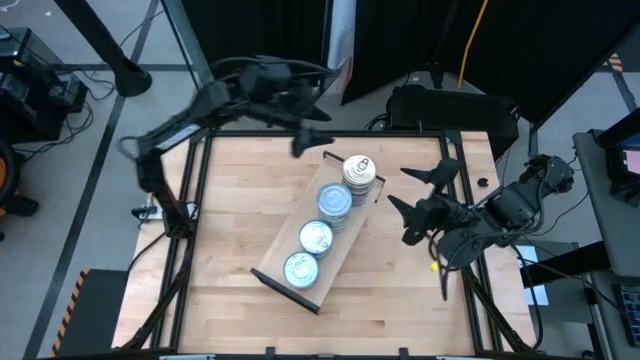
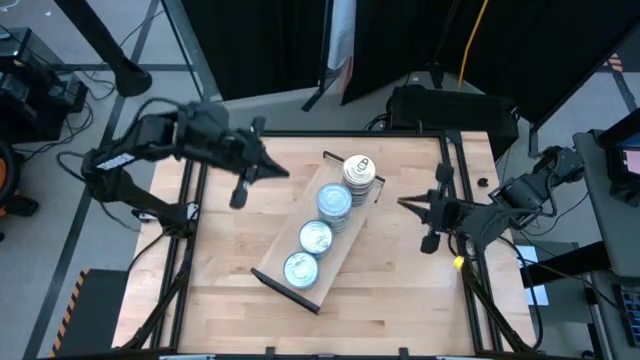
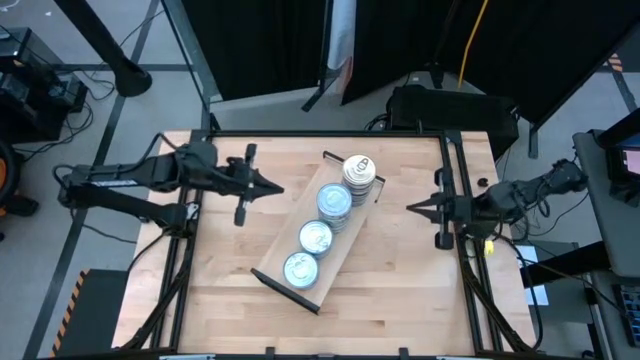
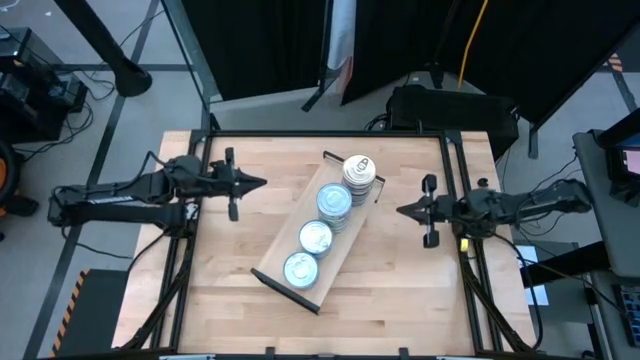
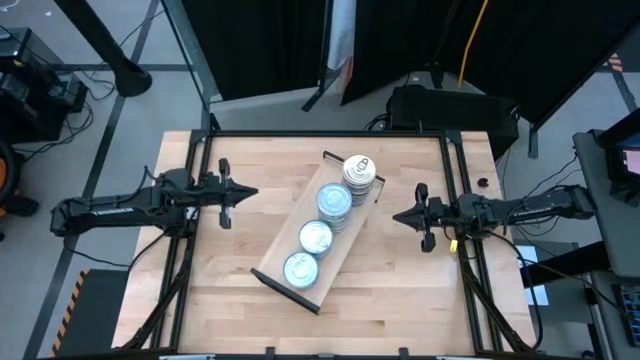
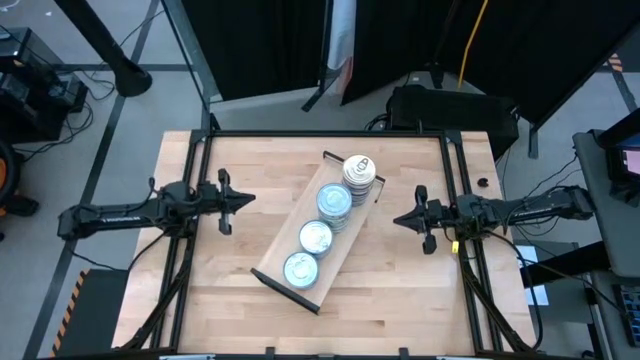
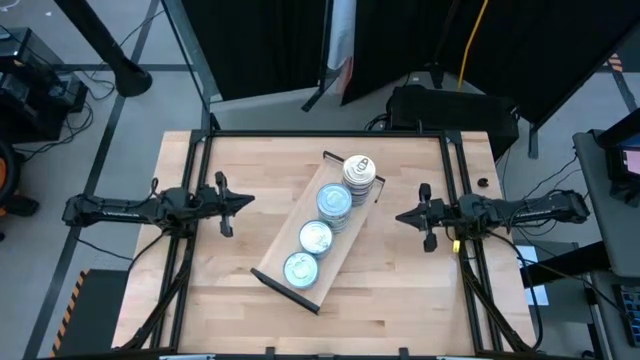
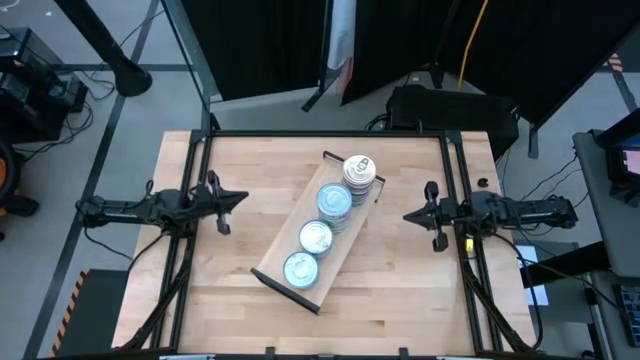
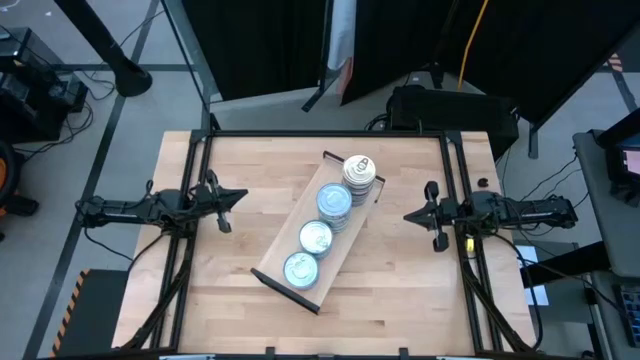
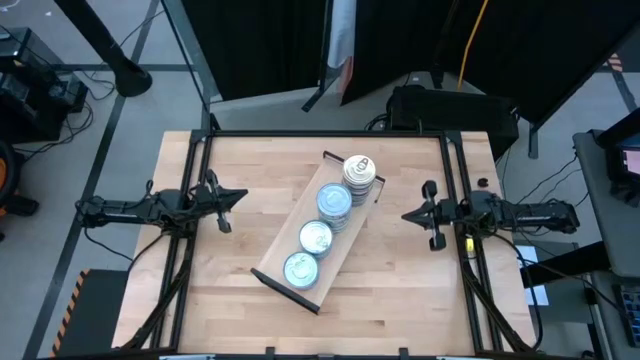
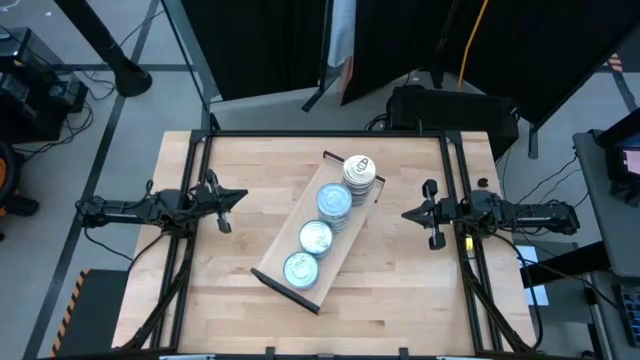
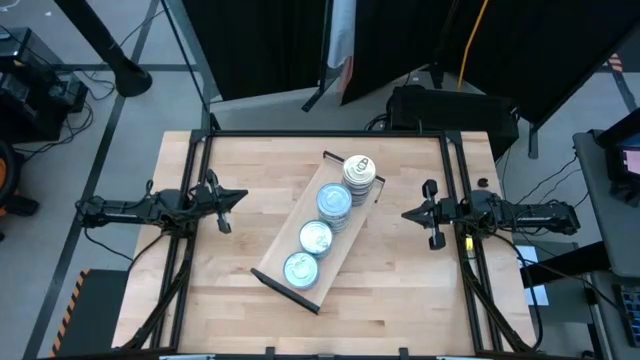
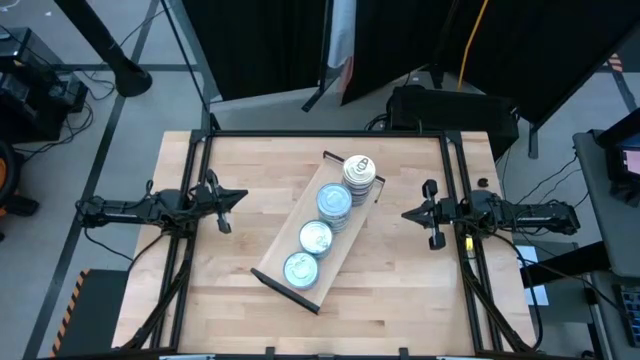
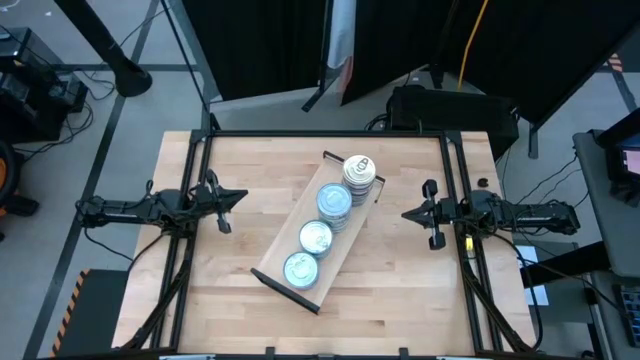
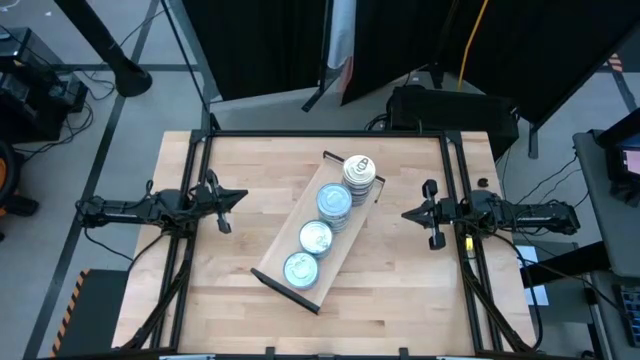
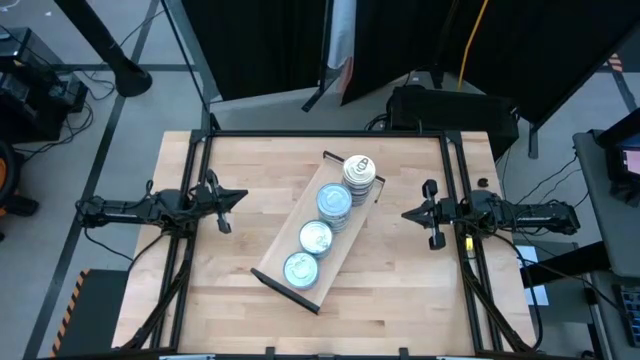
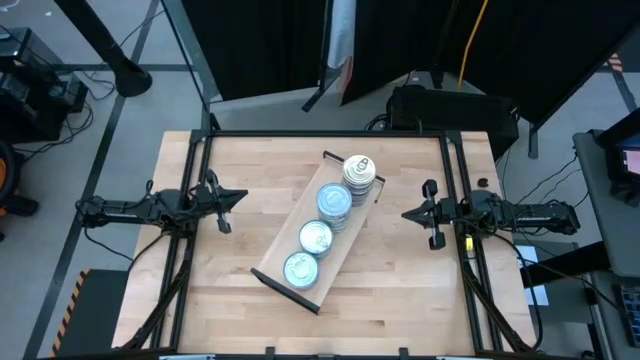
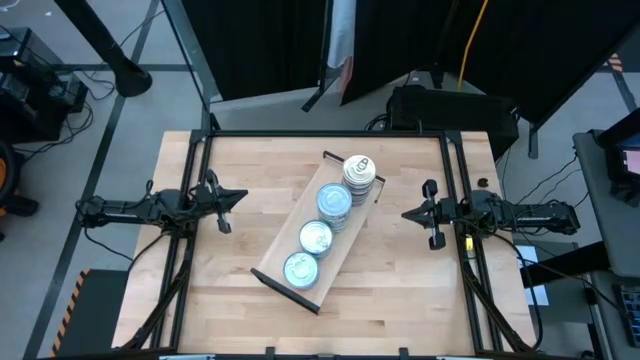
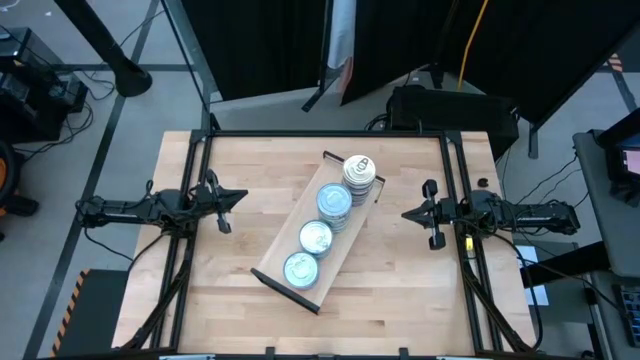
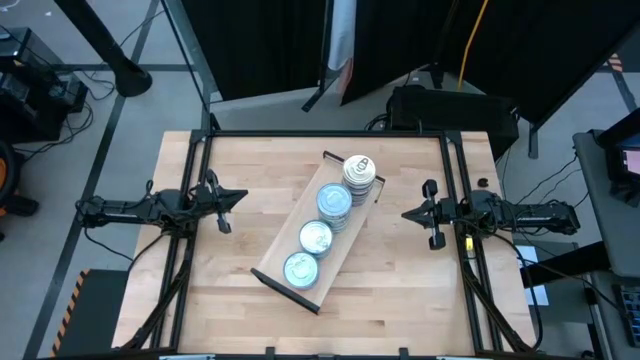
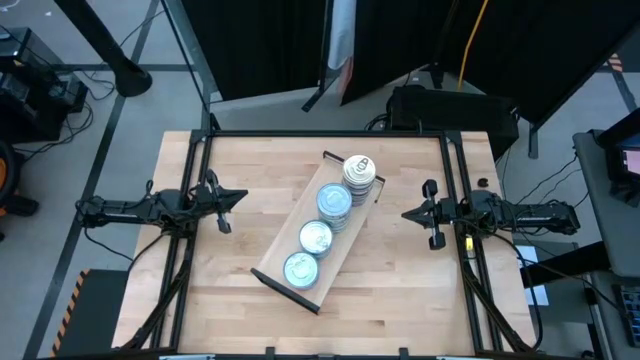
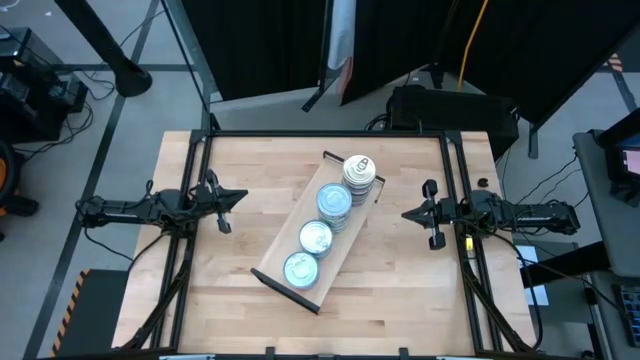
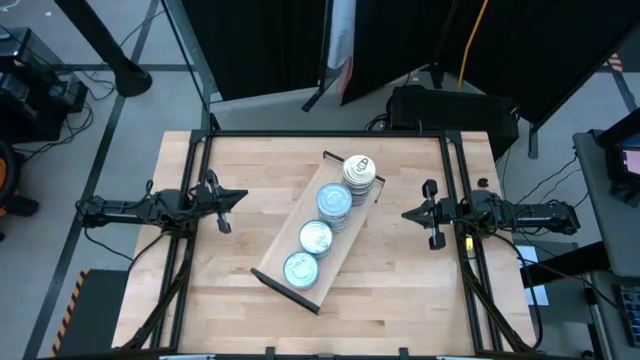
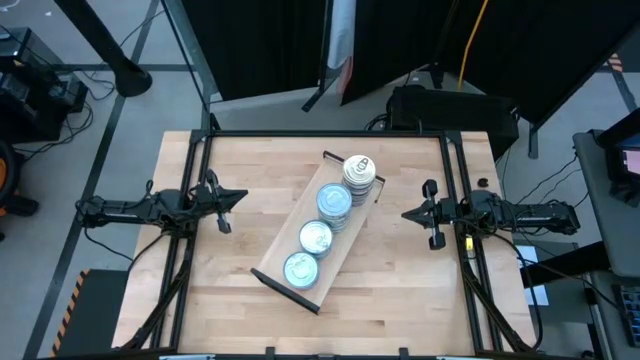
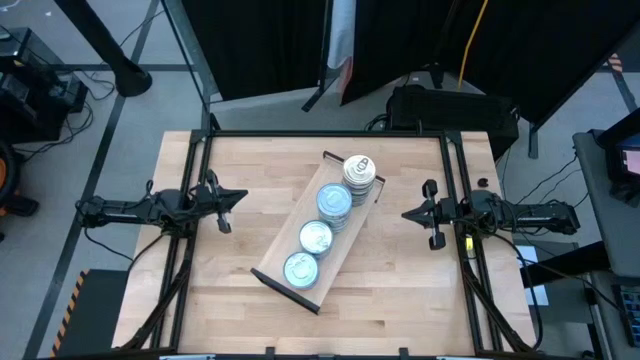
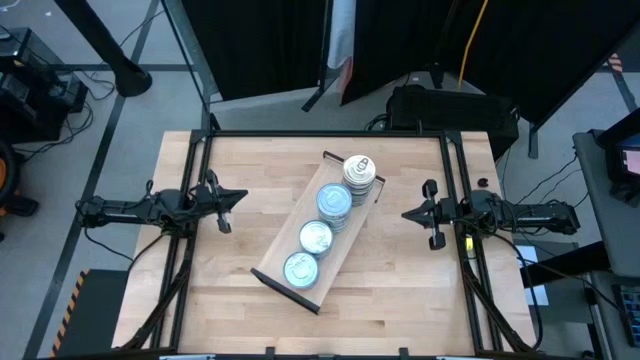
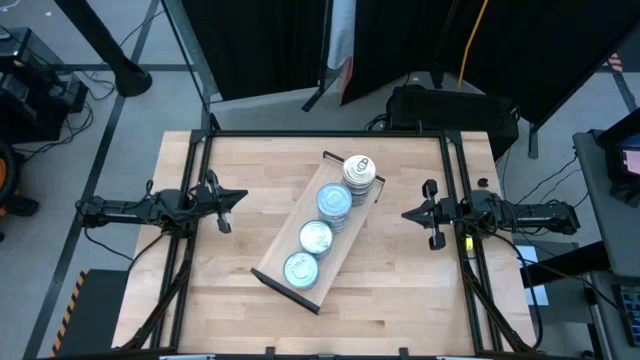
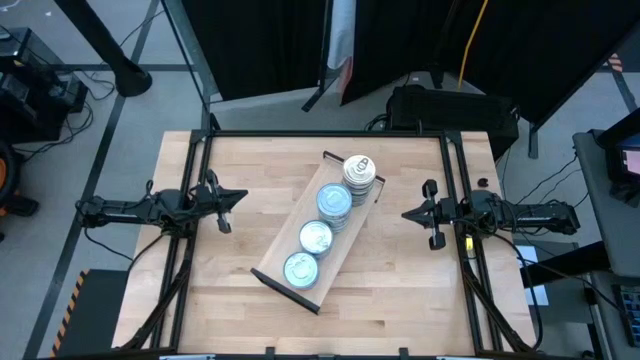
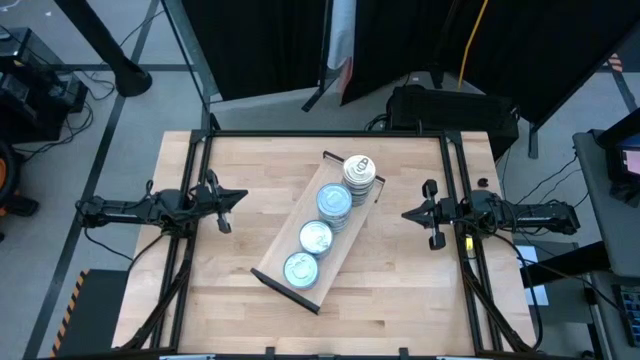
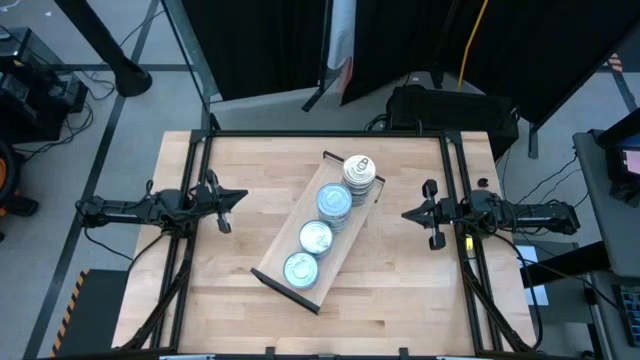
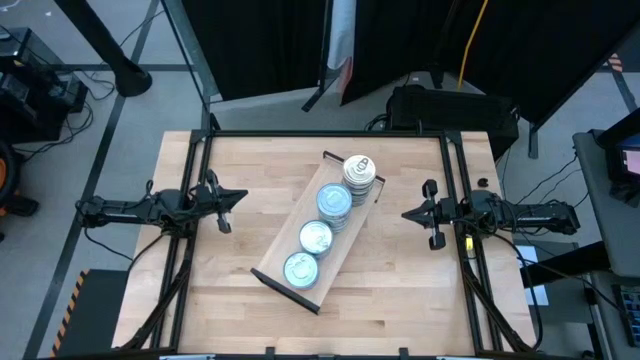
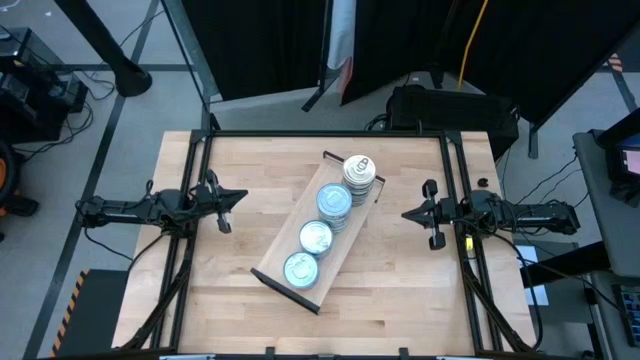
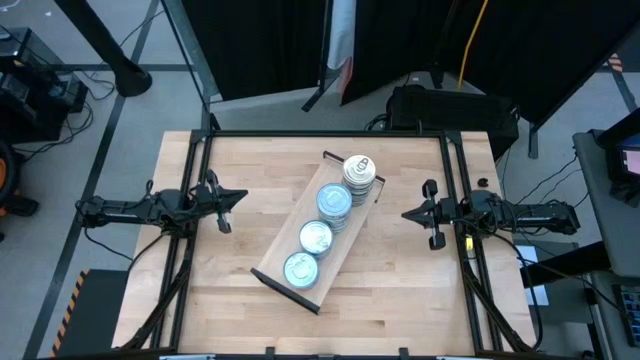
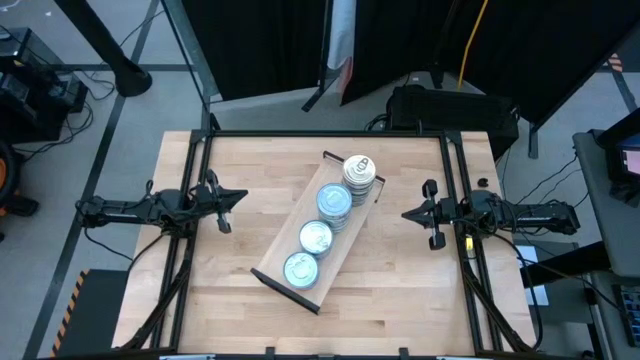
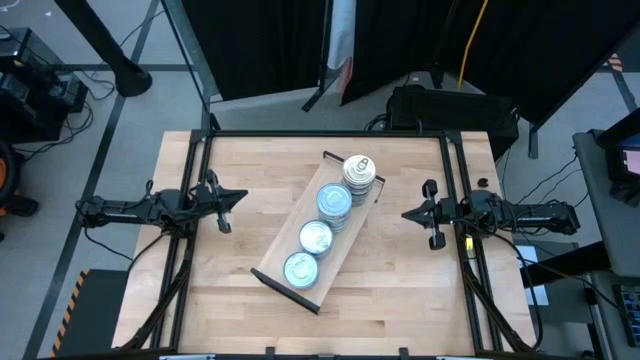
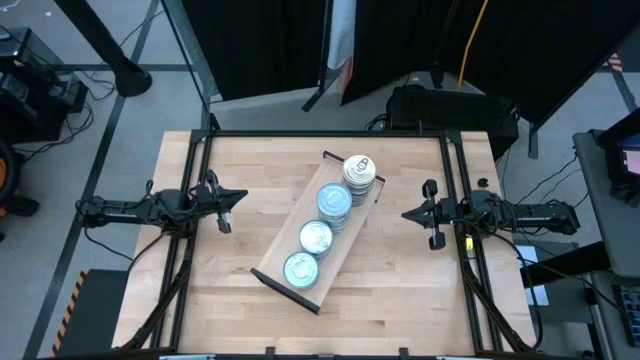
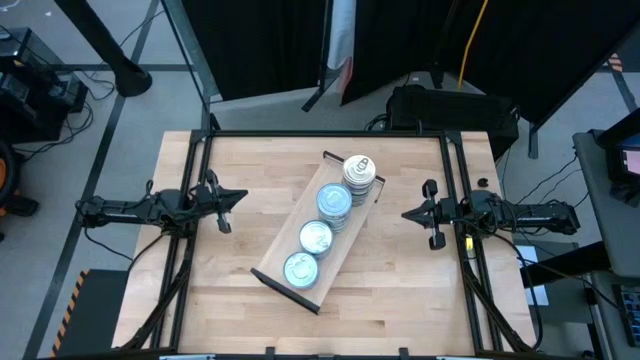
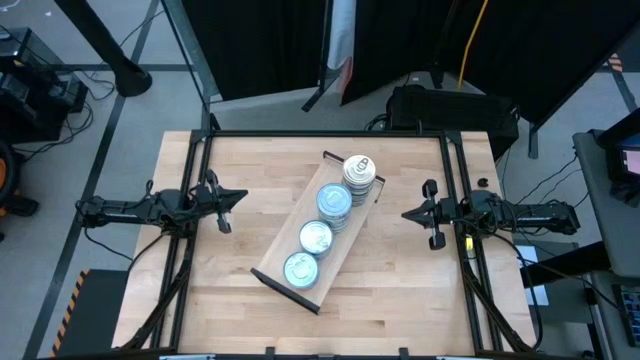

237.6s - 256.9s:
Task: Stack canned seafood by type on shelf
Return to Home Position

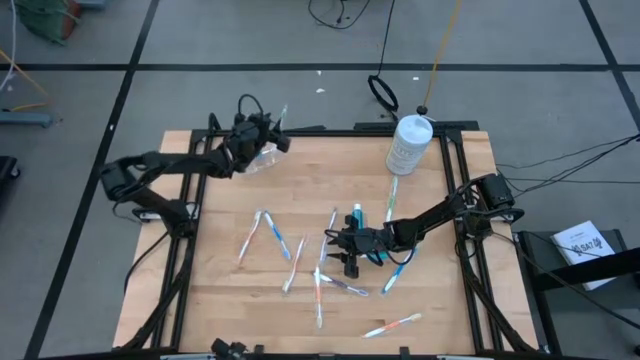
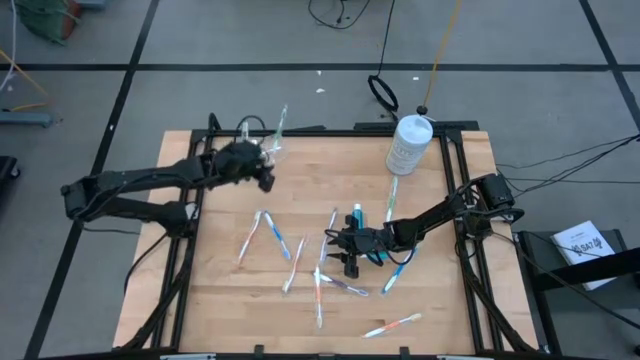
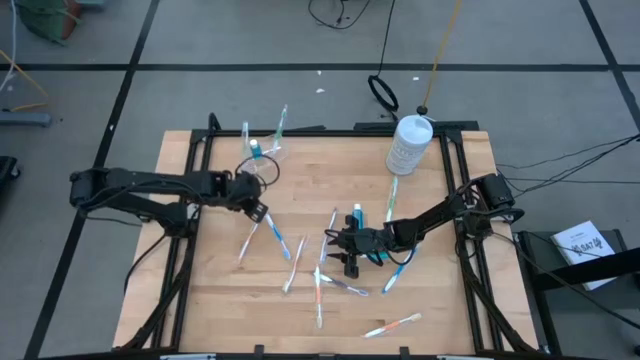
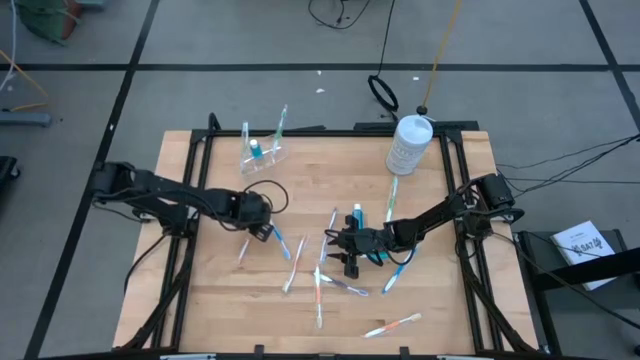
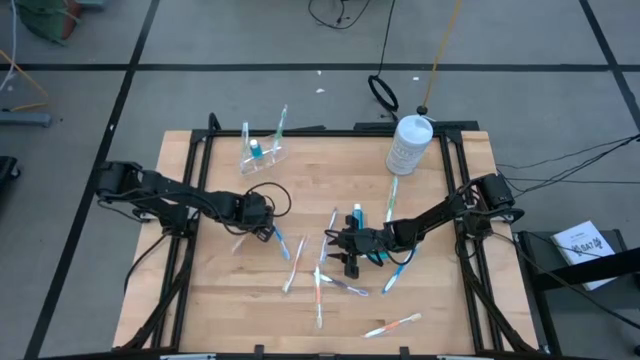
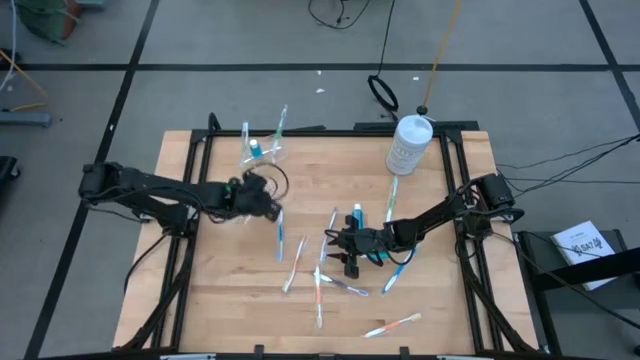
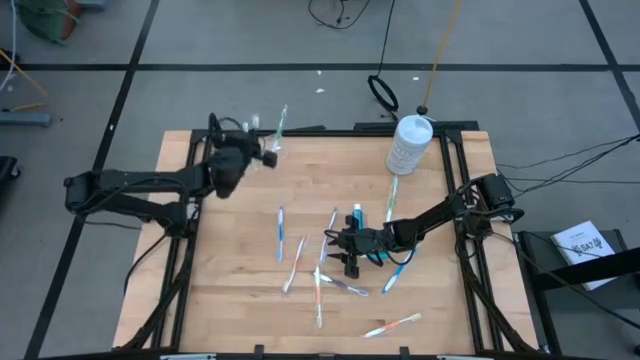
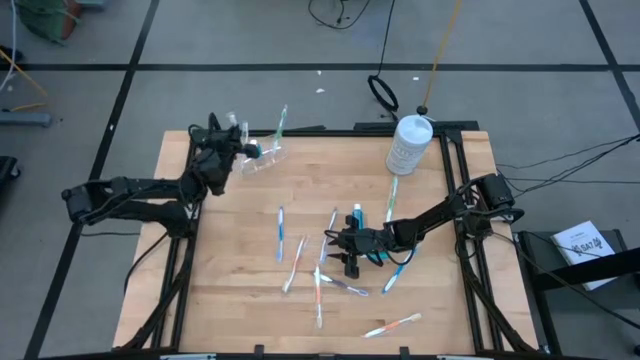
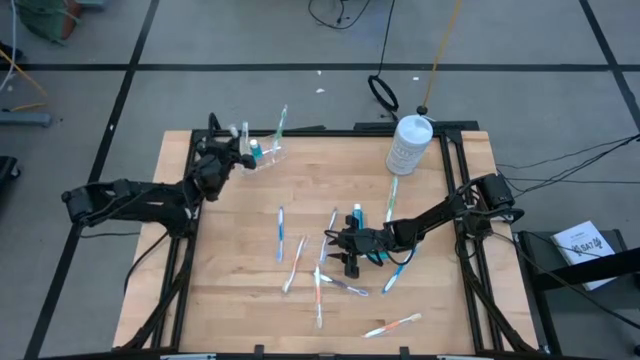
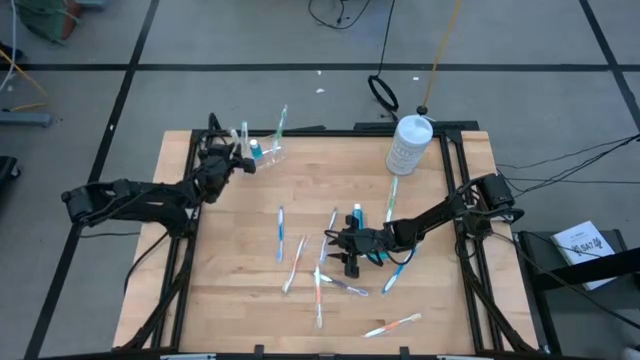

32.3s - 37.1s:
Task: Pick & Place toothbrushing station
Put the orange toothbrush into the transparent organizer
